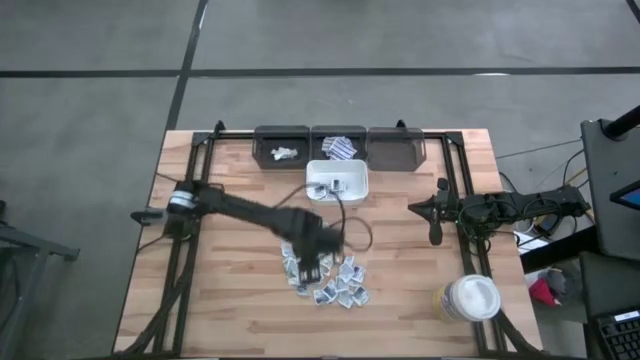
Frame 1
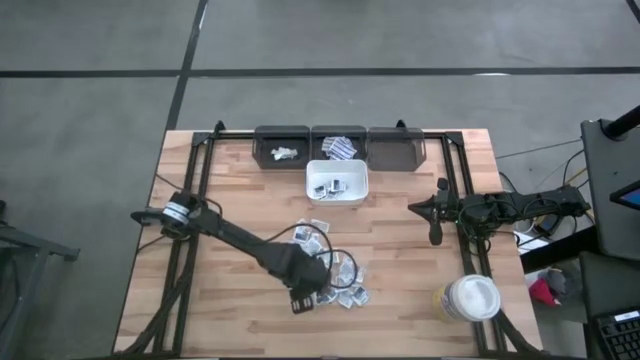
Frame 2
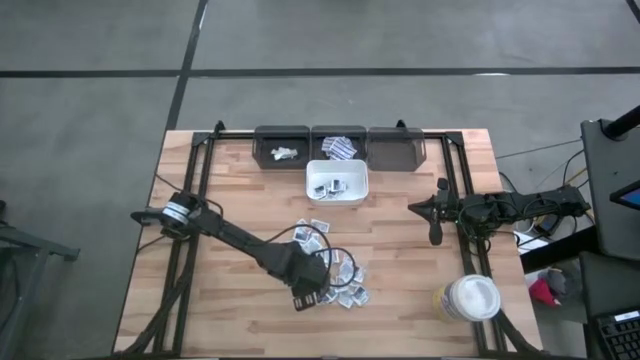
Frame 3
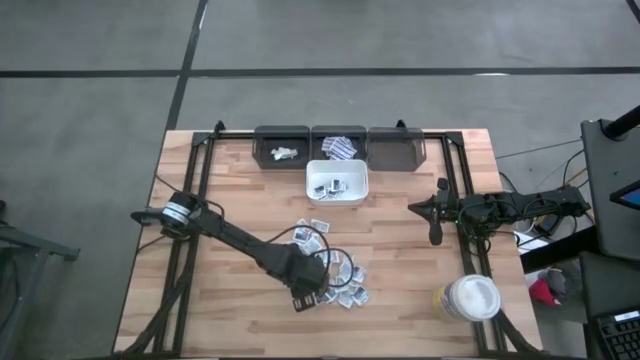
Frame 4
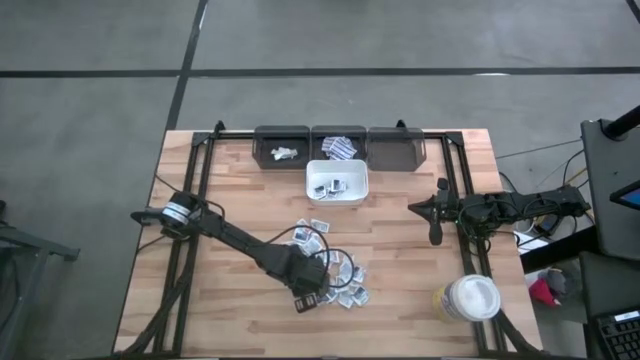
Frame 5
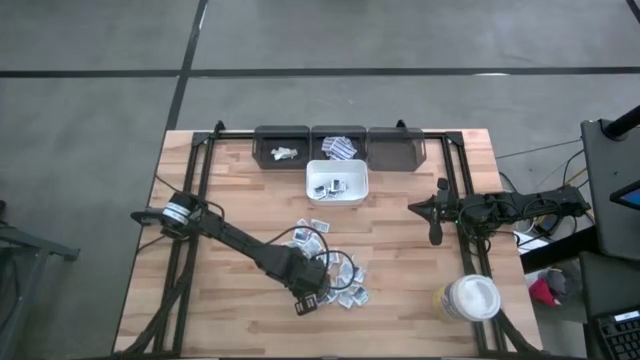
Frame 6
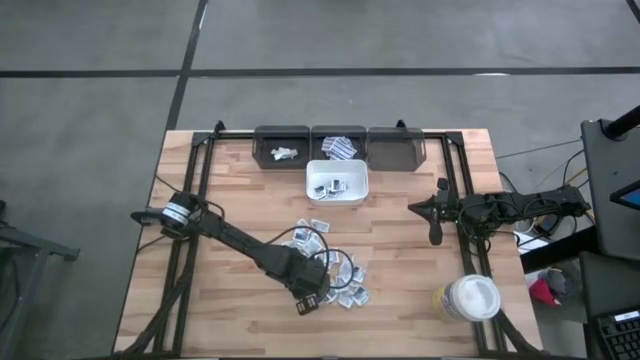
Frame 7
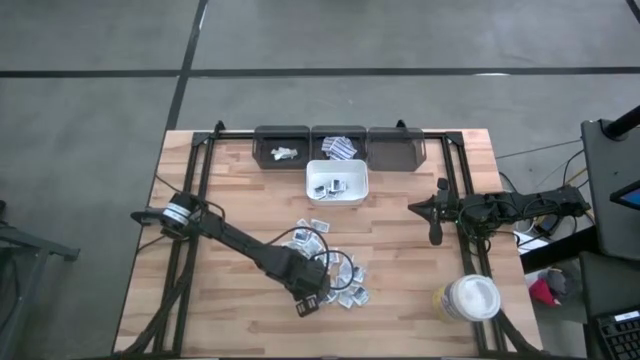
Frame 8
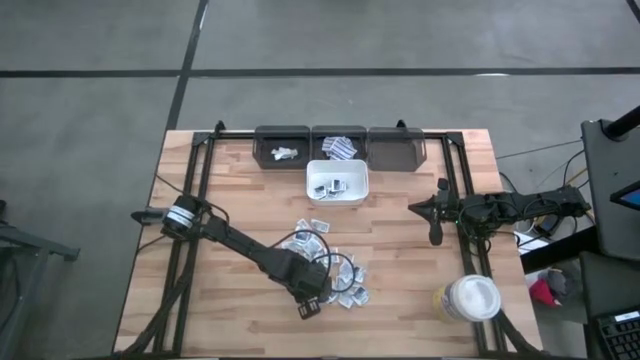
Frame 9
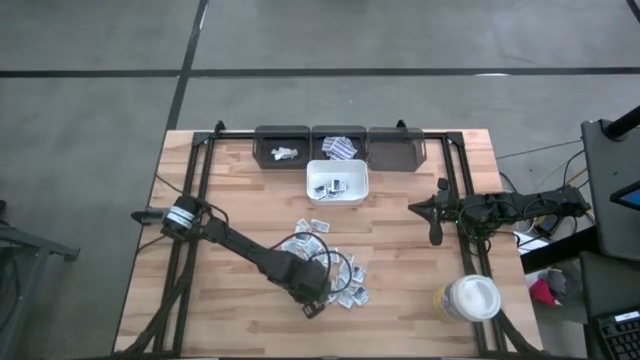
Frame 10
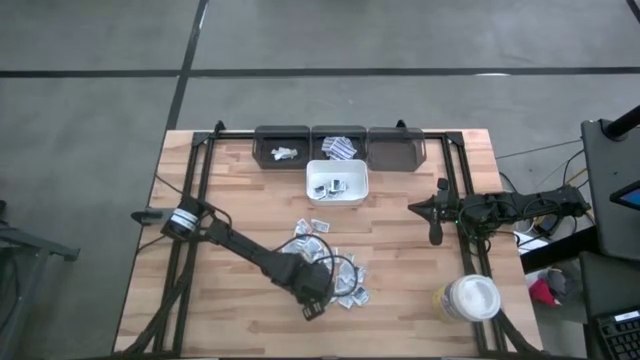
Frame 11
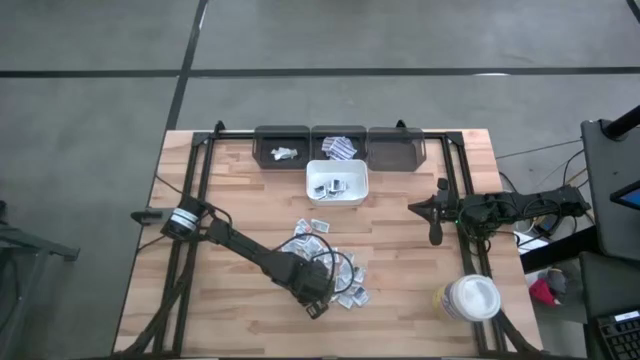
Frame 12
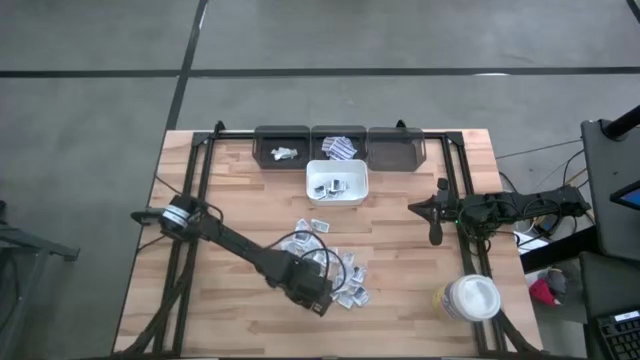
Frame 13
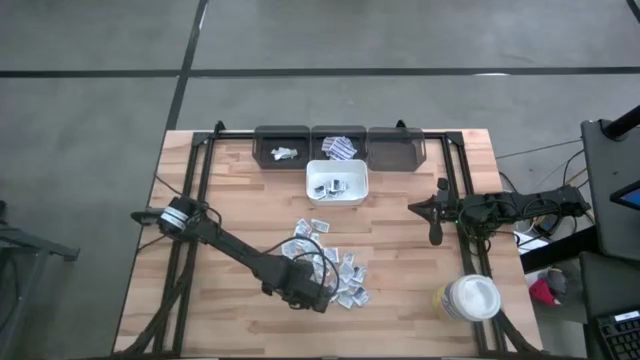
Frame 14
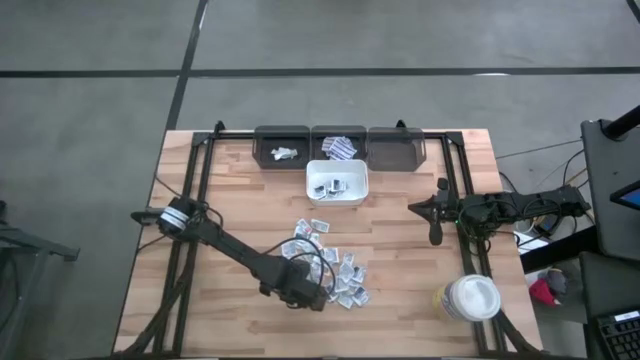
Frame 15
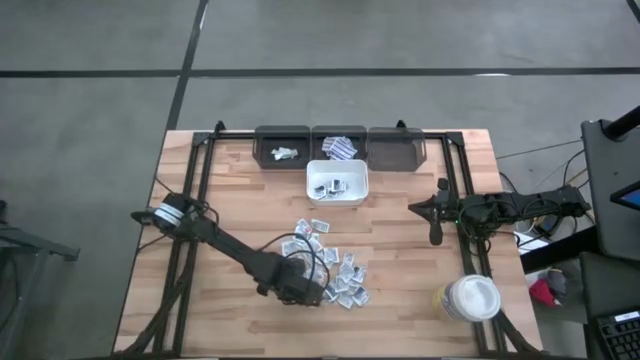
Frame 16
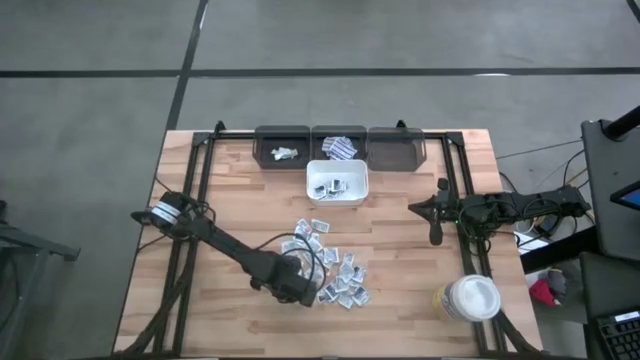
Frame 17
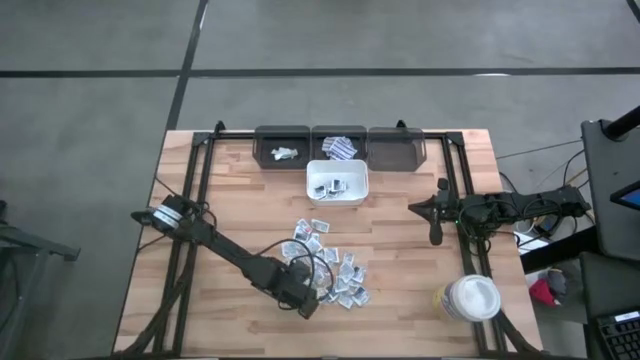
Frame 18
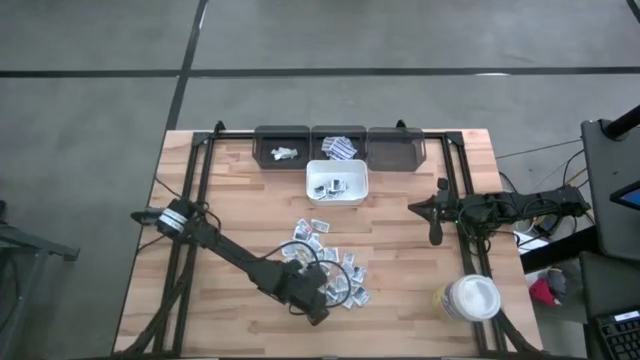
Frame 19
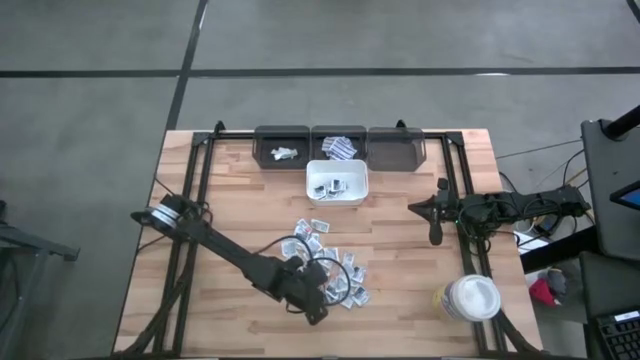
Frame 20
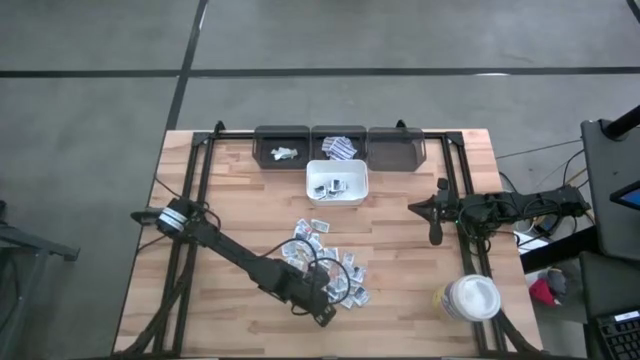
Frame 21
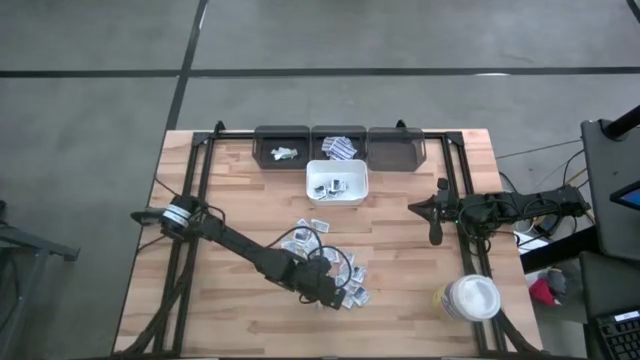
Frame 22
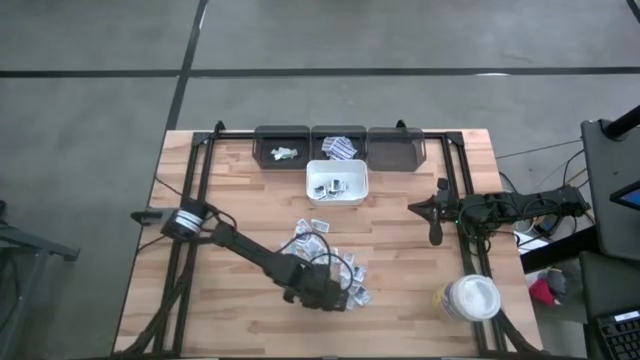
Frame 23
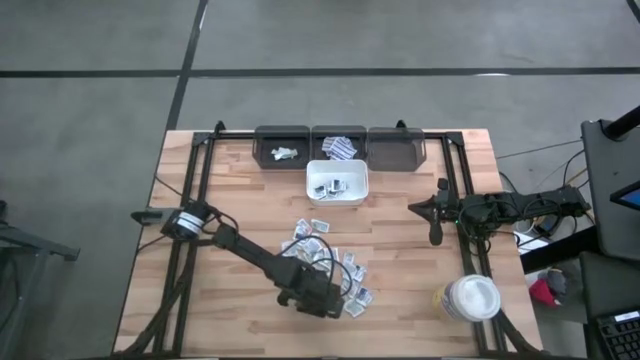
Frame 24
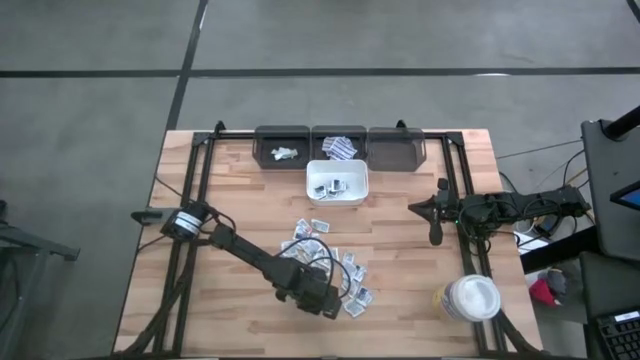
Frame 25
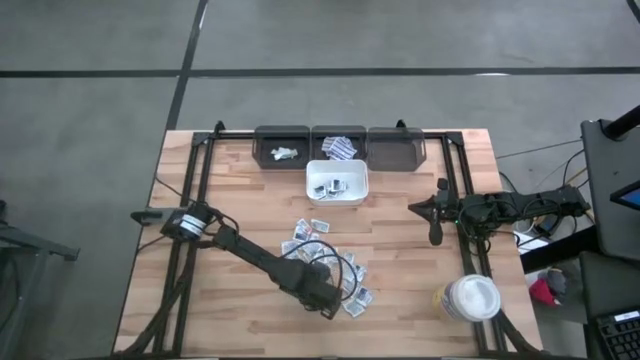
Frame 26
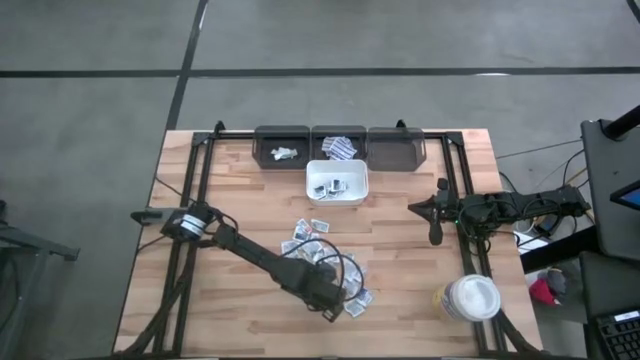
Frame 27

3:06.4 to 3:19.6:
Task: Pick & Place First Aid Supplies
Put the blue alcohol pad into the white bin

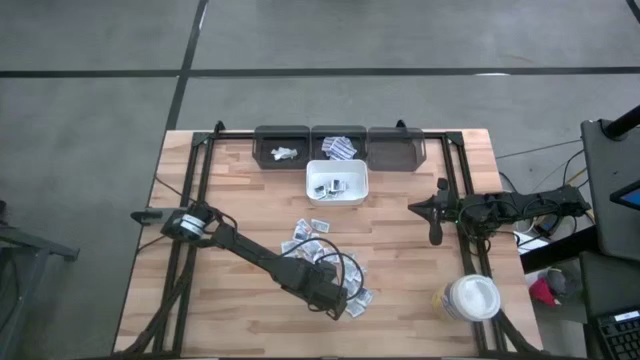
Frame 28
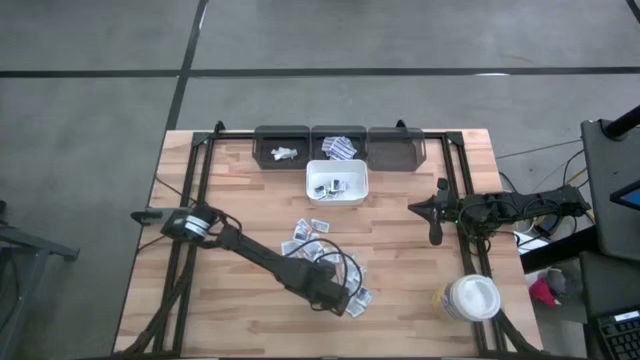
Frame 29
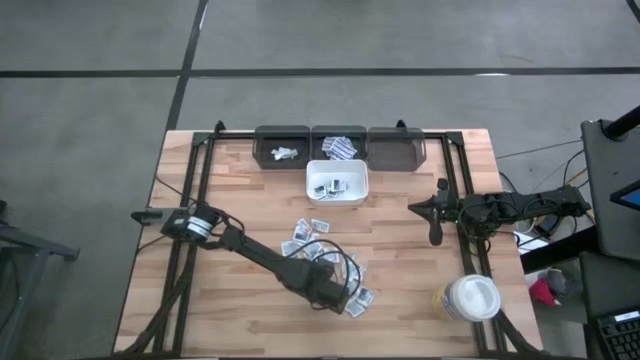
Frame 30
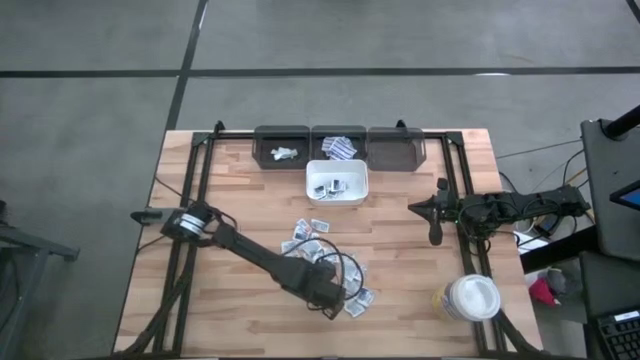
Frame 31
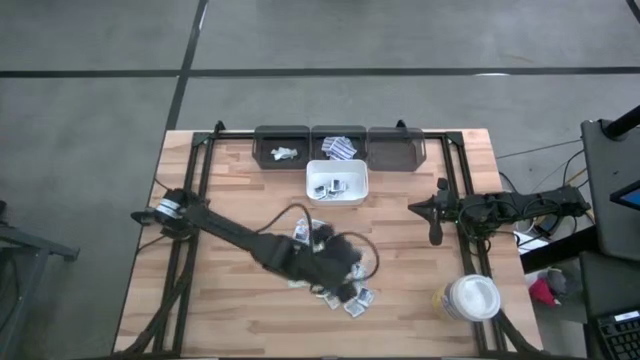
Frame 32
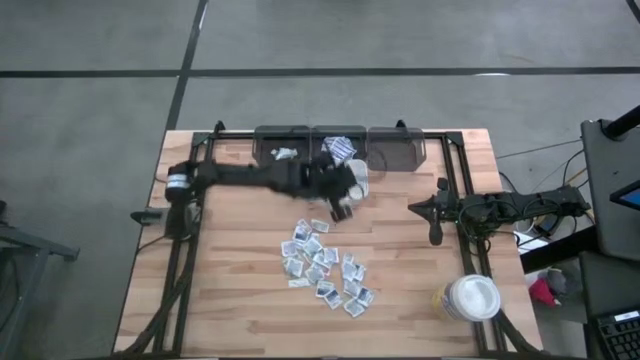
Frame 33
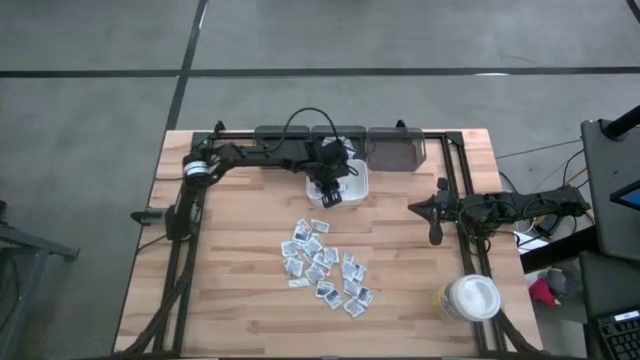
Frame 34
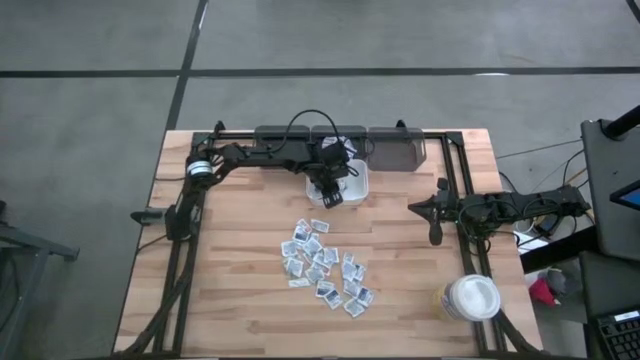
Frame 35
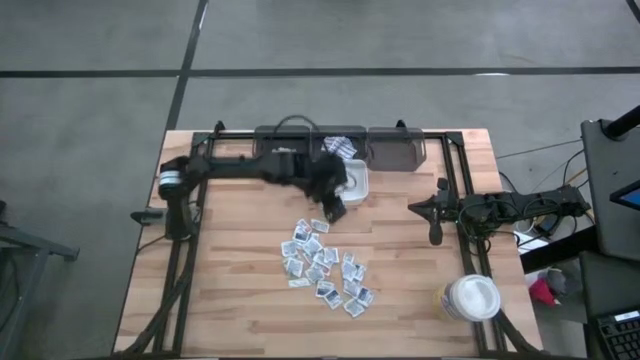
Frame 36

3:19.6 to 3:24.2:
Put the blue alcohol pad into the white bin

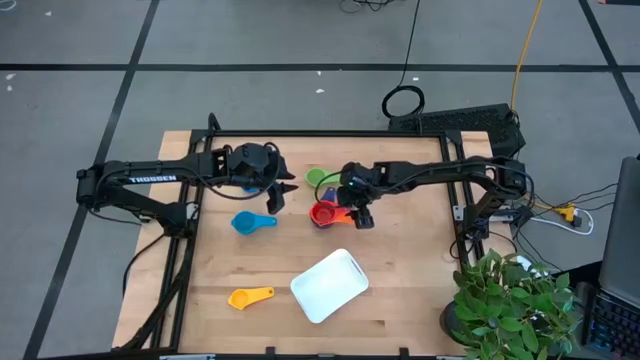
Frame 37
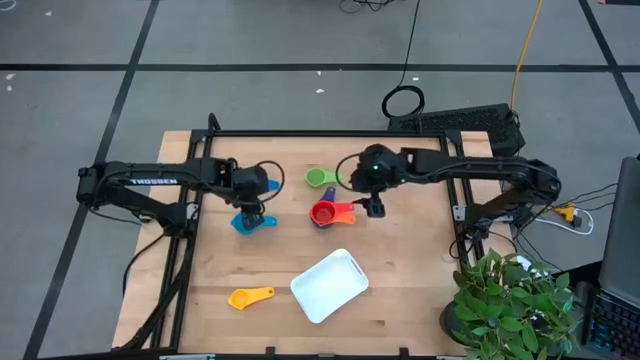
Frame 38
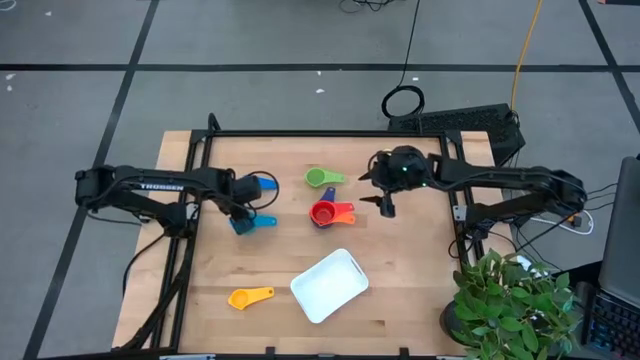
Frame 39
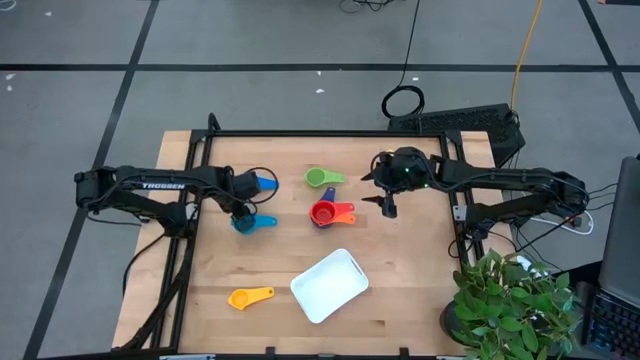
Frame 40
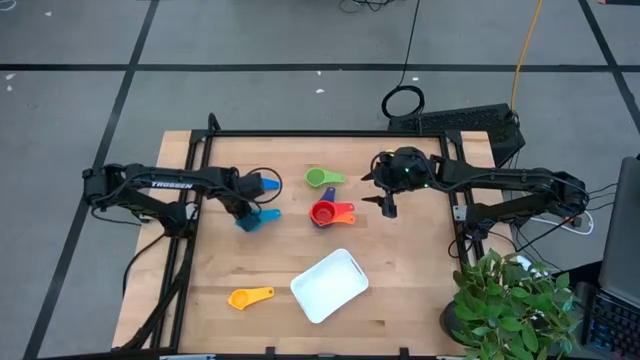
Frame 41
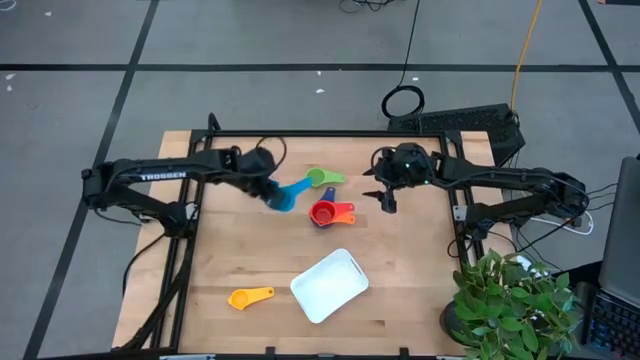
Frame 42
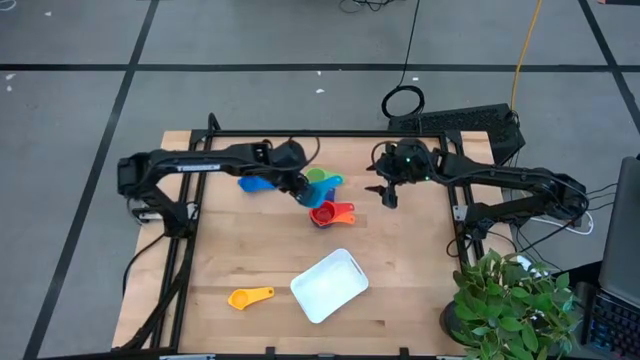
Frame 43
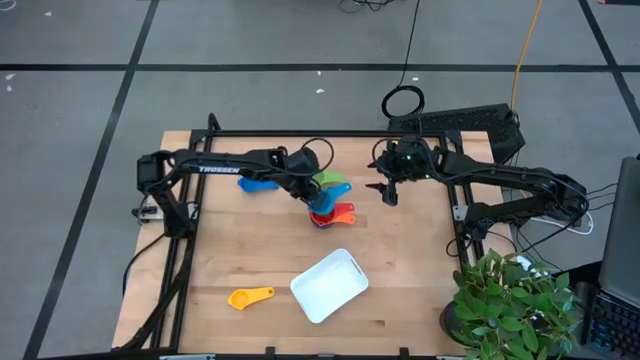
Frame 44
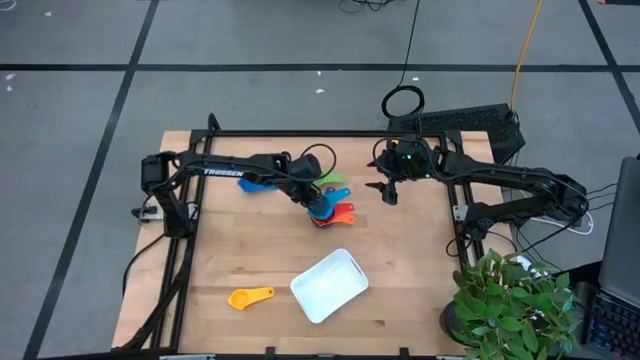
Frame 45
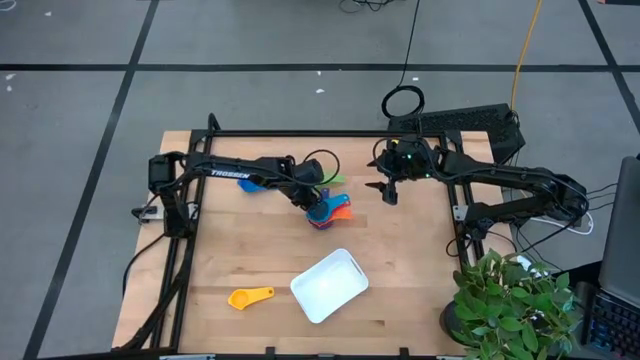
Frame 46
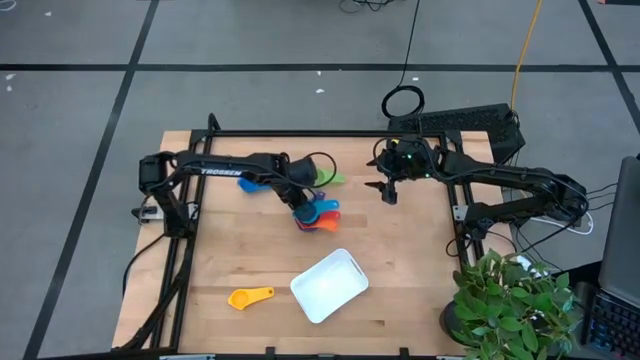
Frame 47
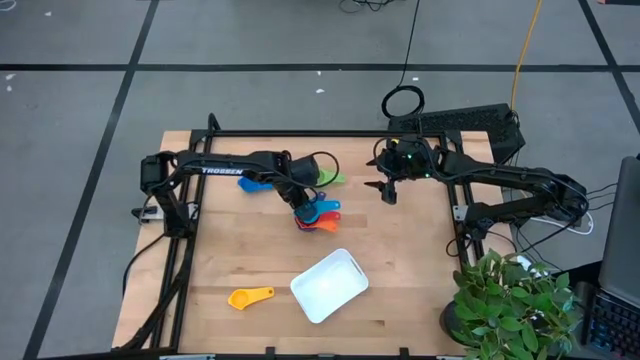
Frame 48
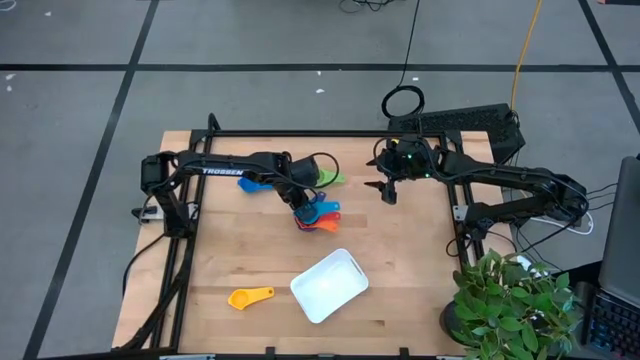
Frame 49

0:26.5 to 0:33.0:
Task: Nest measuring cups in basket
Stack the light blue measuring cup on top of the red measuring cup
